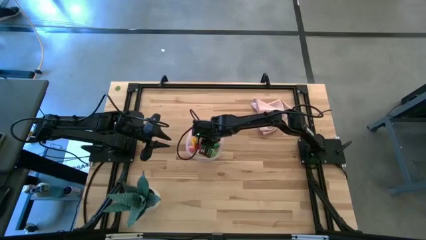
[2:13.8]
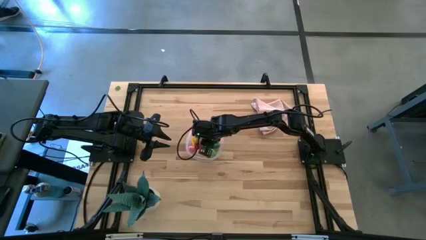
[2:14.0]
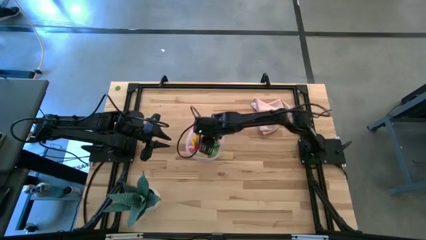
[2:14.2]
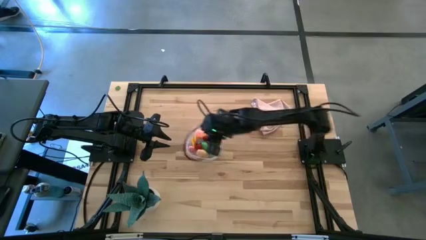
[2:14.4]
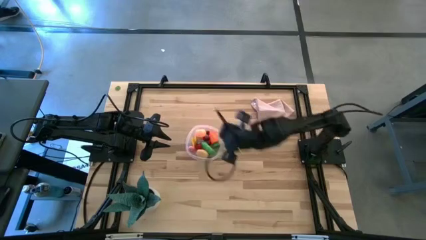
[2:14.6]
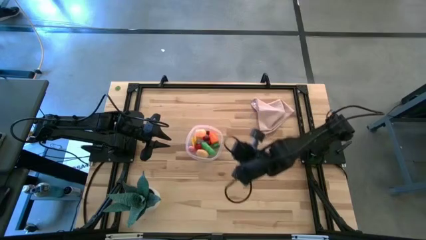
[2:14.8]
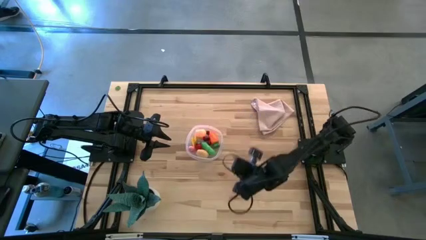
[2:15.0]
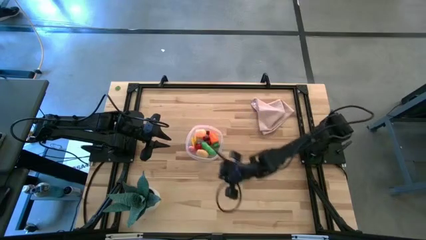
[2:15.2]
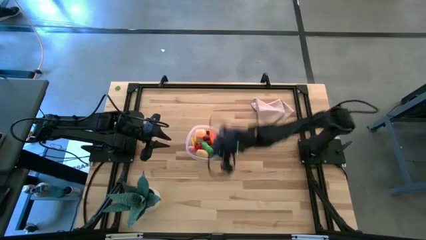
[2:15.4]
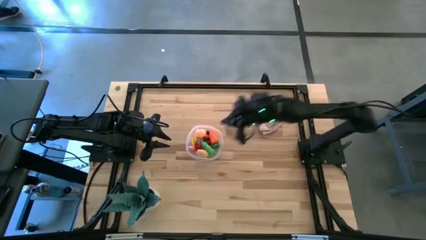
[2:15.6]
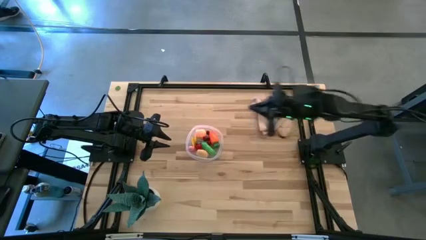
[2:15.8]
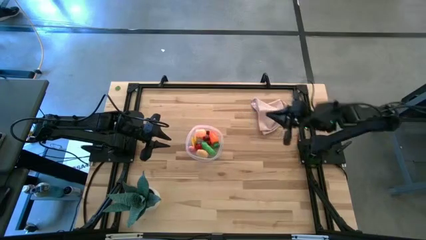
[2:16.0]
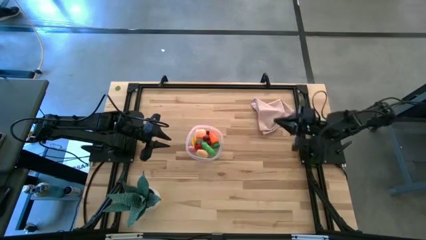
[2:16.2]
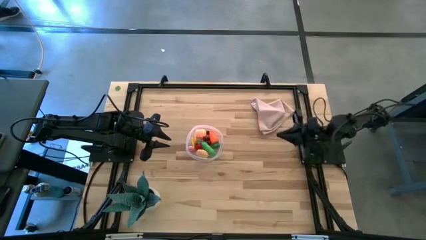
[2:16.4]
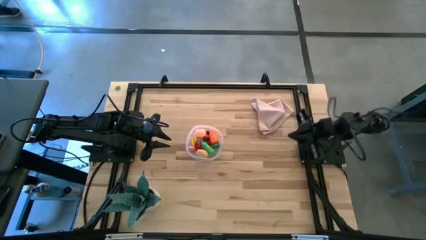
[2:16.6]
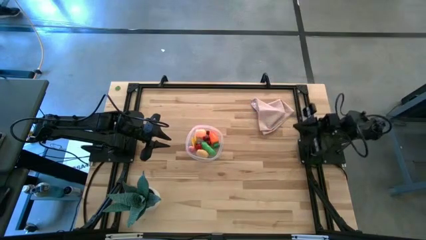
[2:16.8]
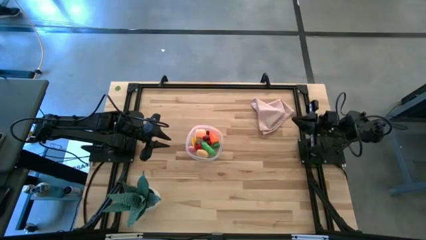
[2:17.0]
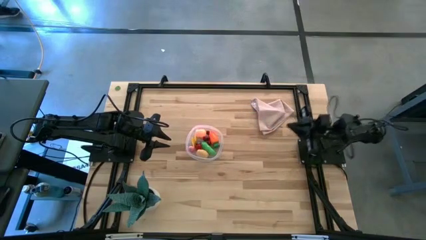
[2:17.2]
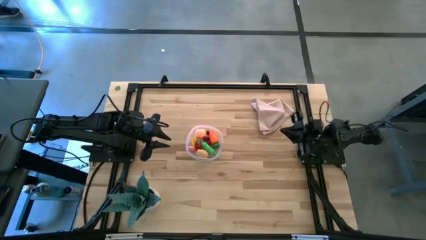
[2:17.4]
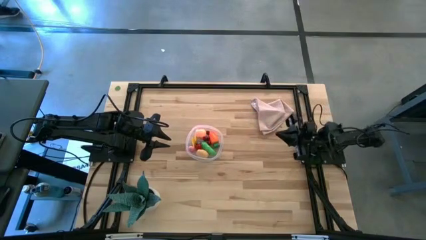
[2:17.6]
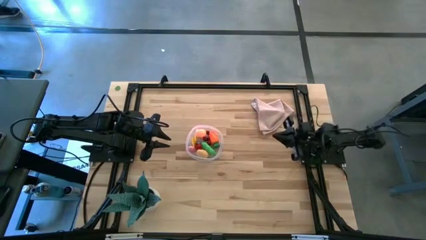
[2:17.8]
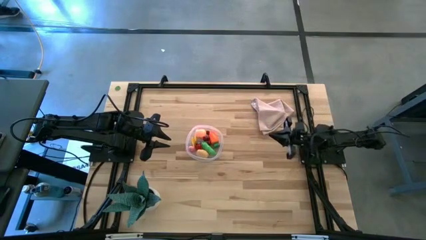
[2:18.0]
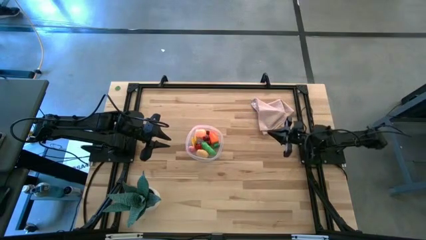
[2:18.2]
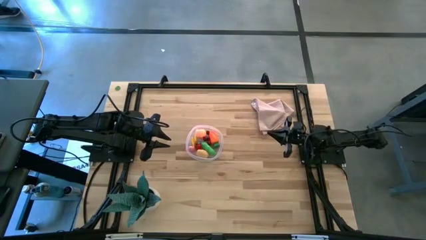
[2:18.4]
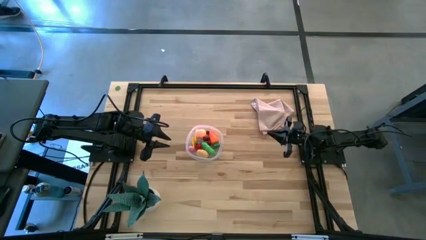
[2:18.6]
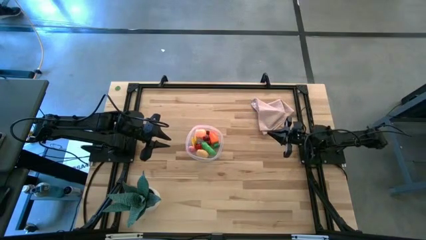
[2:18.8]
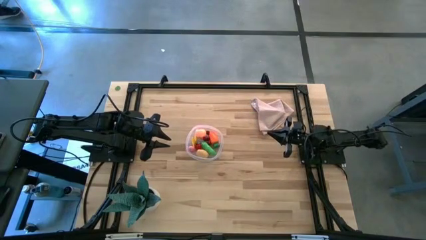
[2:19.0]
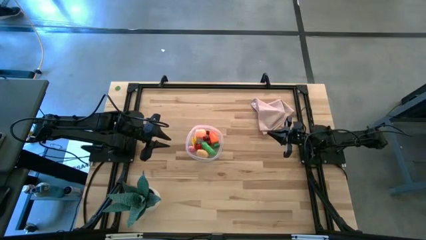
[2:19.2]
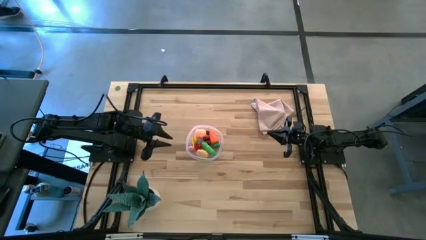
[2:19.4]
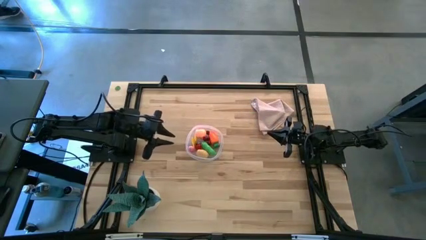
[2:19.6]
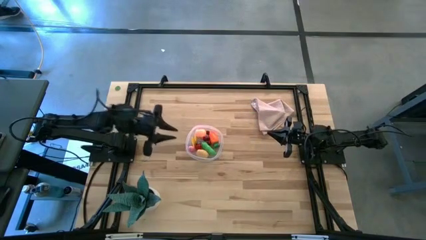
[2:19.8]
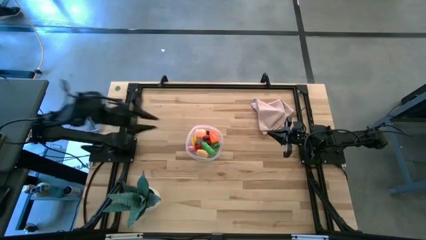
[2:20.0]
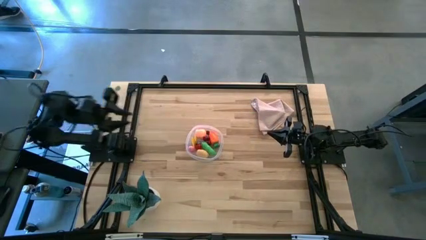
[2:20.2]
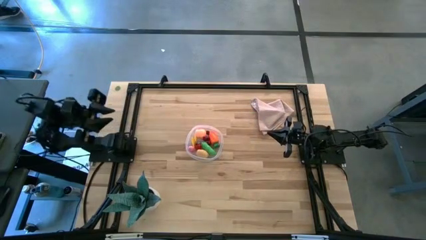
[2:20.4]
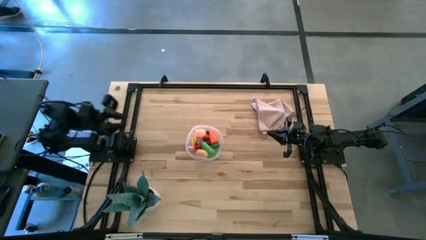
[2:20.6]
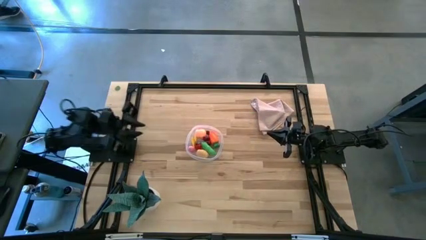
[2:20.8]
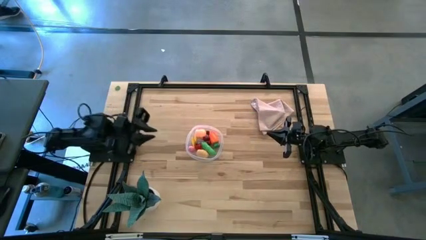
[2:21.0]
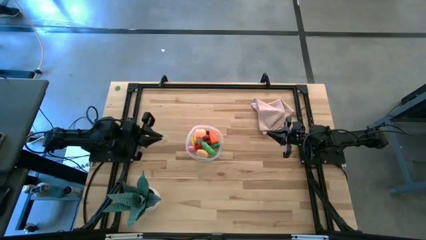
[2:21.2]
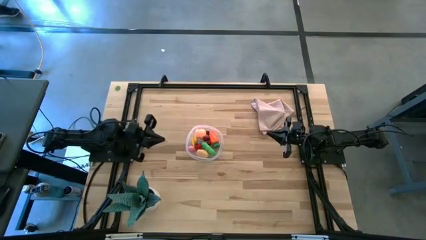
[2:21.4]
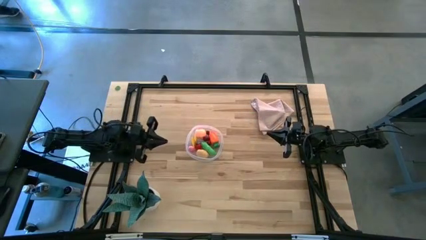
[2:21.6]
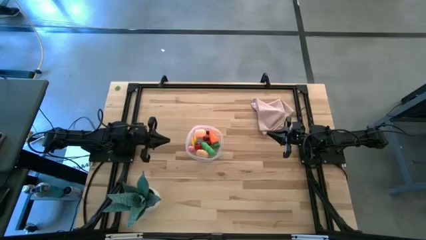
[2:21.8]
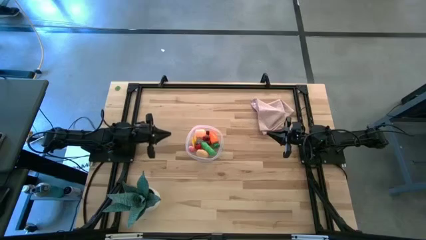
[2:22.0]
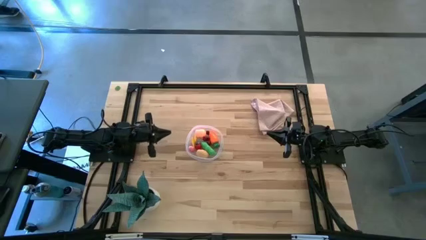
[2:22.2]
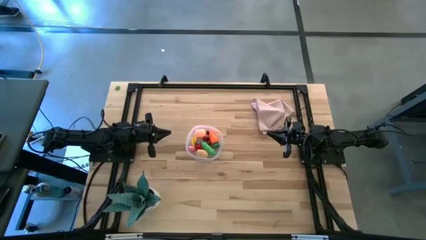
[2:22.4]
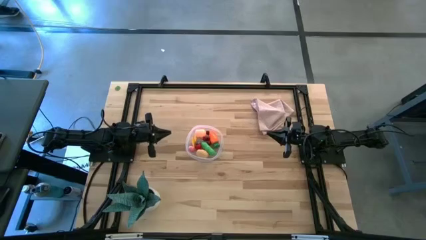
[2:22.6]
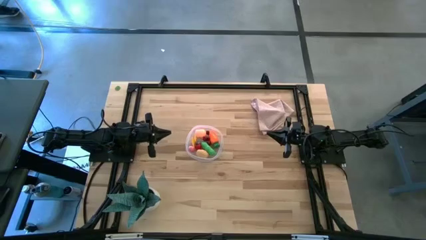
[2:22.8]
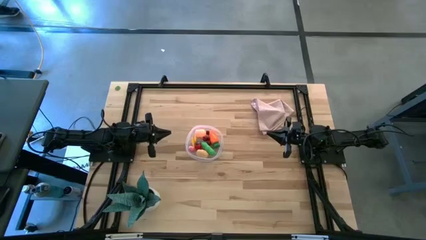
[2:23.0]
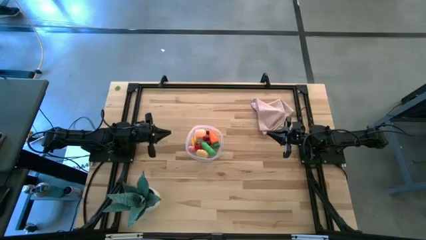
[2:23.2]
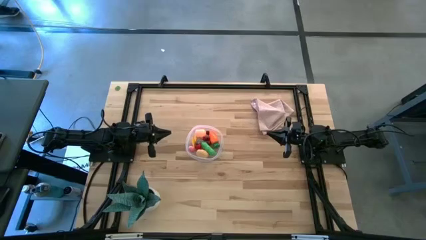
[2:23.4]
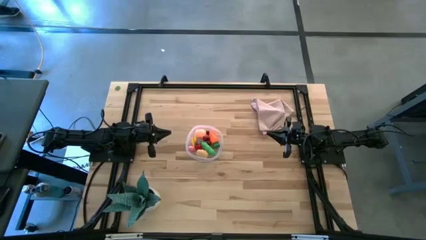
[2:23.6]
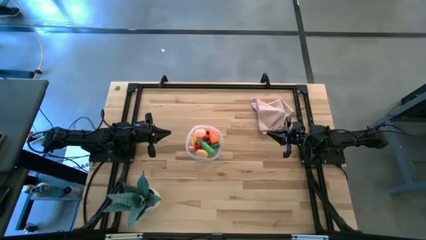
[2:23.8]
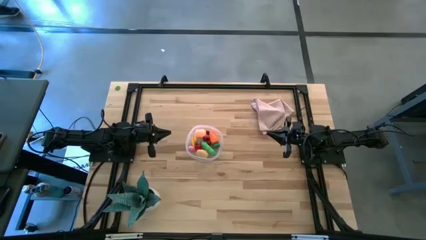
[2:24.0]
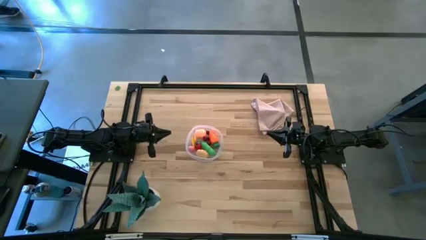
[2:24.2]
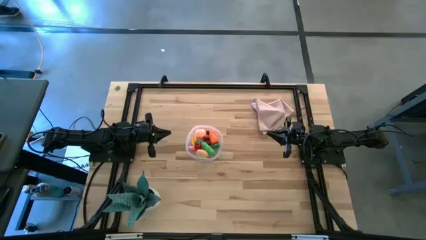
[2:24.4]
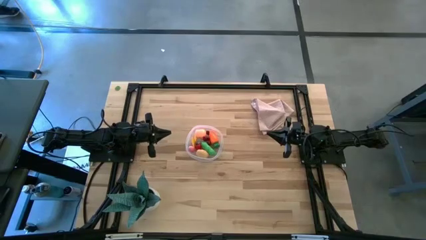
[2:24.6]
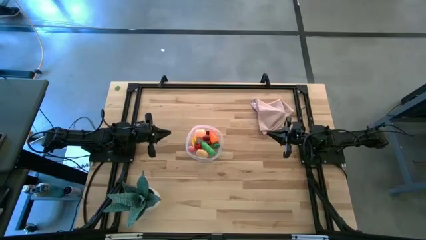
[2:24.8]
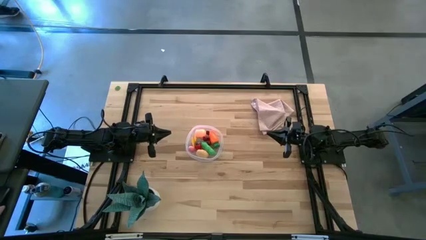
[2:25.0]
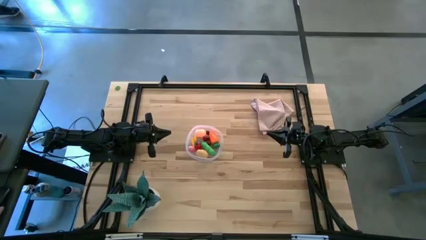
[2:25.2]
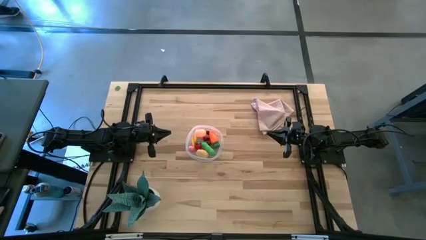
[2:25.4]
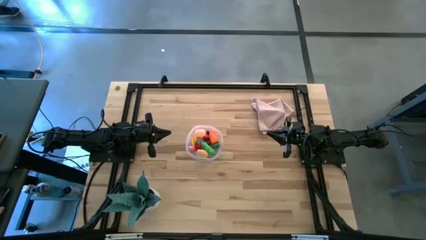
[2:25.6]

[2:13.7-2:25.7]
Task: Pick and placing Produce into tupperware
Return to Home Position

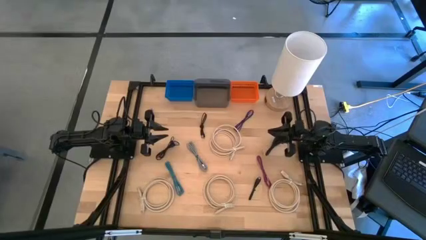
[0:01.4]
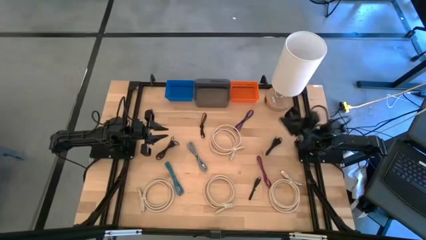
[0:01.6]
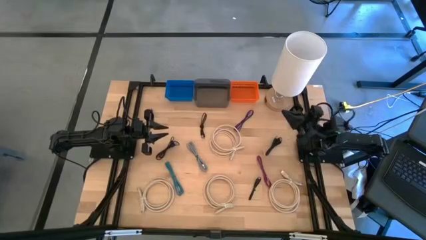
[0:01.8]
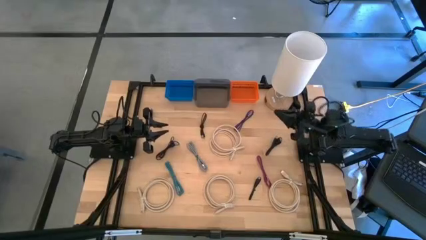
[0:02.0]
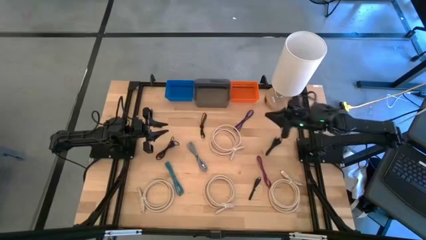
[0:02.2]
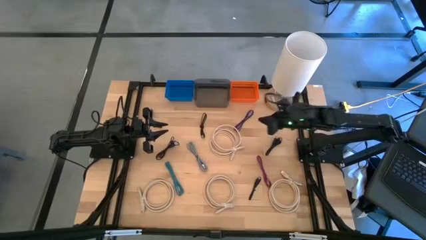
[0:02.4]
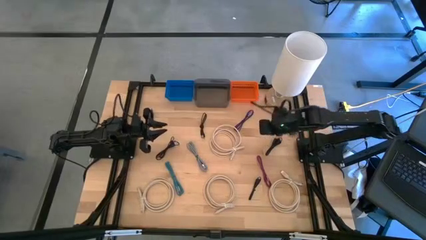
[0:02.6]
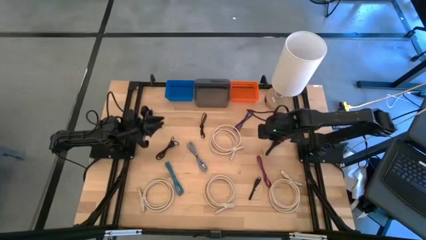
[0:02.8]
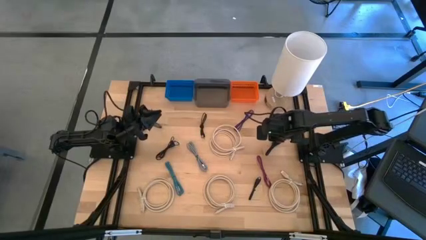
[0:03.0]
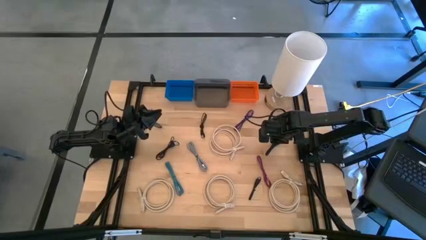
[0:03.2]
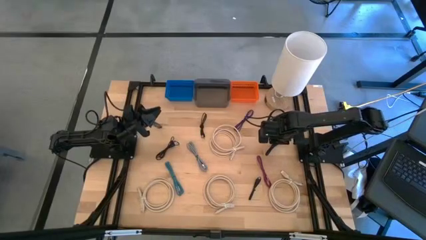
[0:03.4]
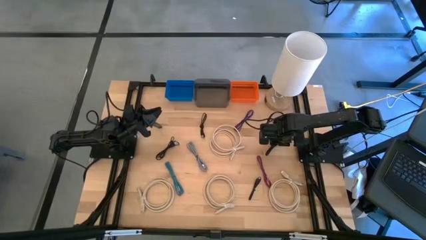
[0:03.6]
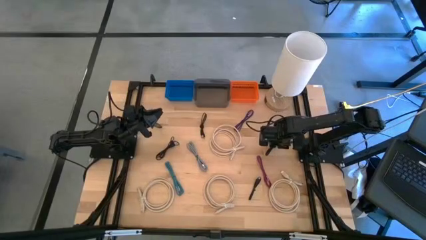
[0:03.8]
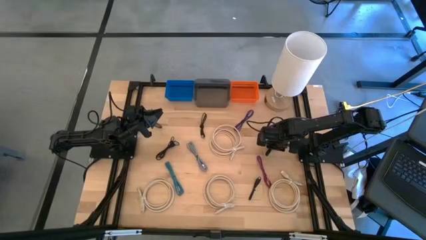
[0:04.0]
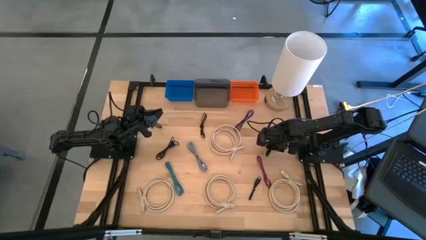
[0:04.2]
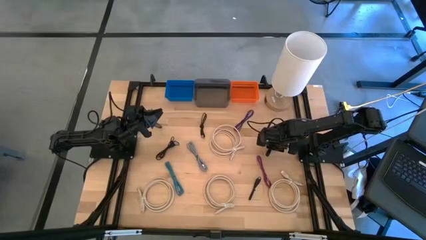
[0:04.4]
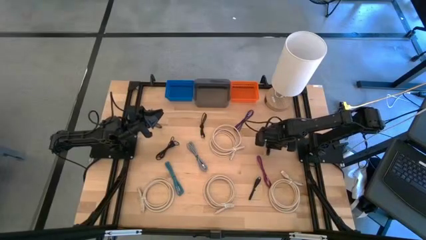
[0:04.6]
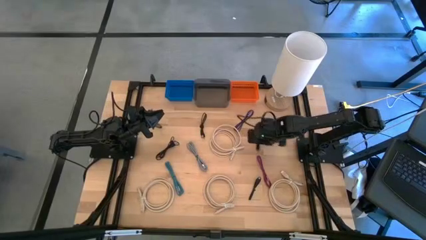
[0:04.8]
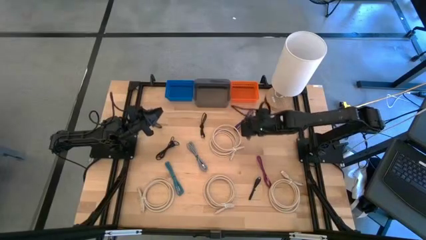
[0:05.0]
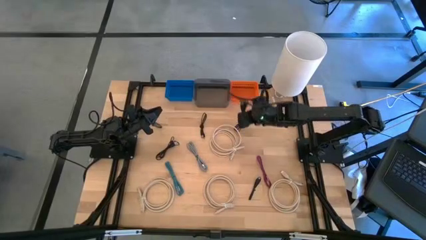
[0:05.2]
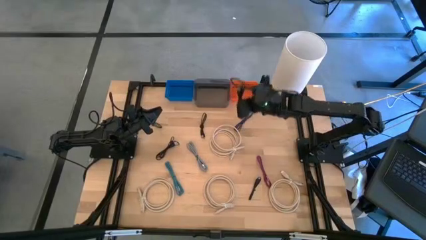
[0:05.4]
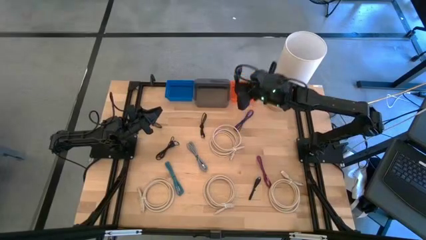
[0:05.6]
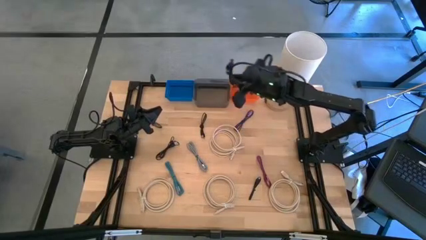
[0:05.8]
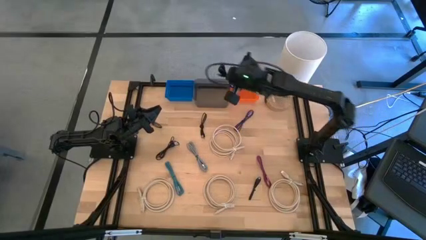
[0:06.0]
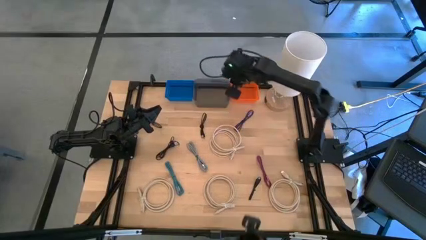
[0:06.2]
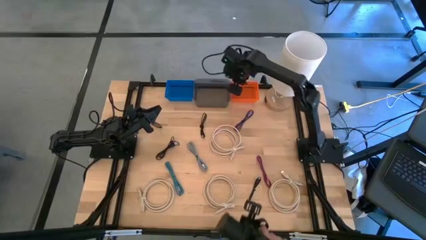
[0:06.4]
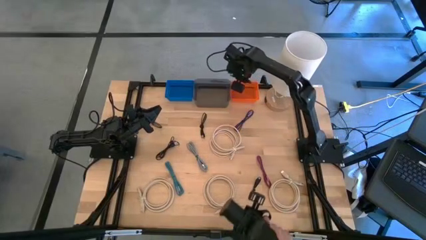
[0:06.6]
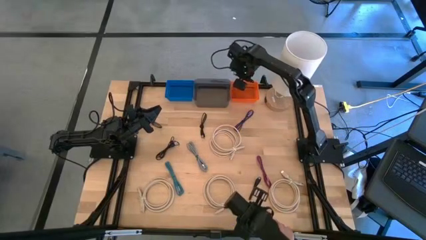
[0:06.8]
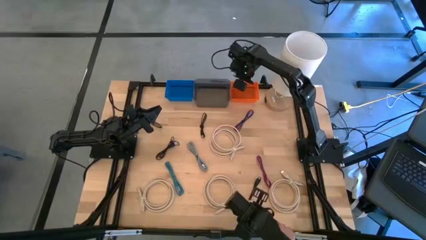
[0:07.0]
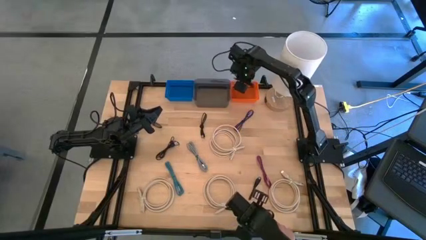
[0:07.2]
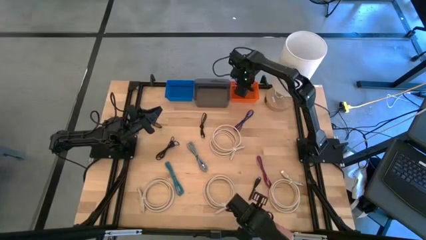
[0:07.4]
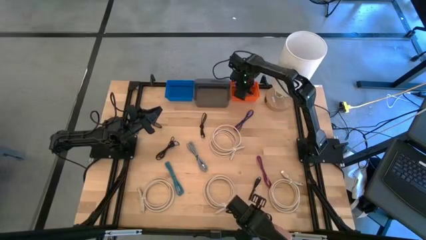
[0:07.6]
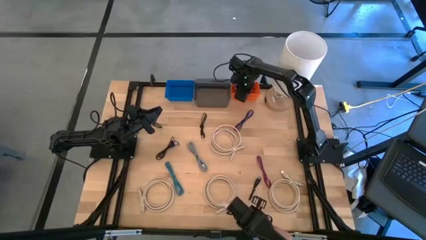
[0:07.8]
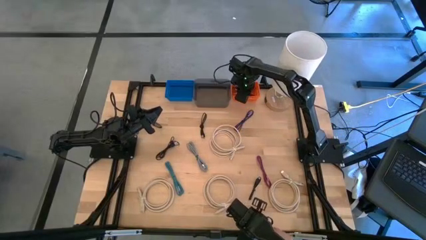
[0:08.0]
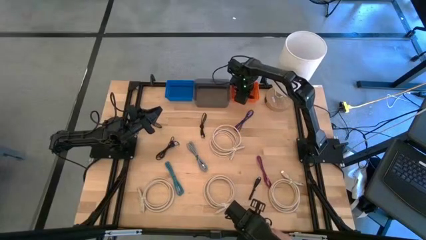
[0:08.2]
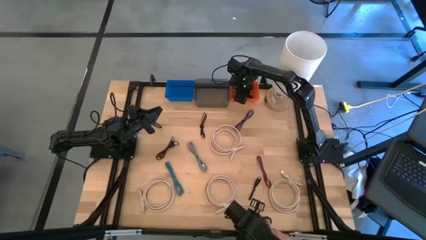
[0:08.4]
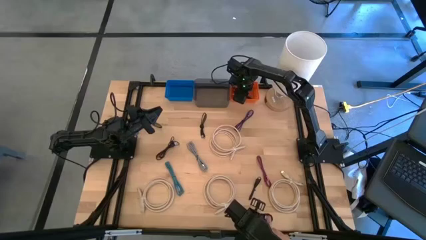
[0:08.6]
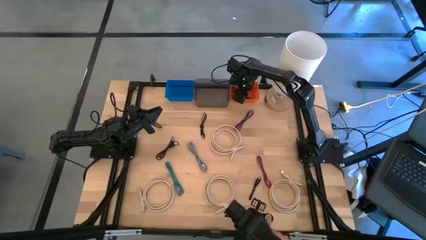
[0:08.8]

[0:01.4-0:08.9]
Task: Pick & Place USB Port
Put the black charger cable into the orange bin
